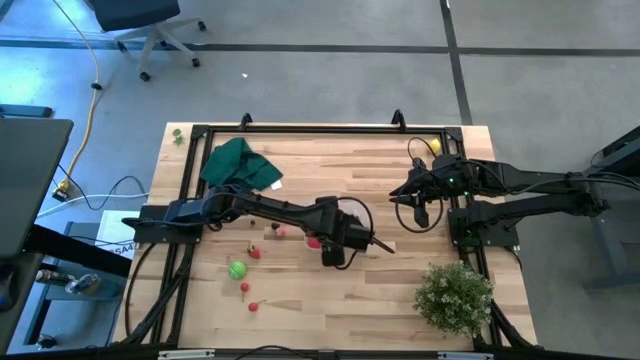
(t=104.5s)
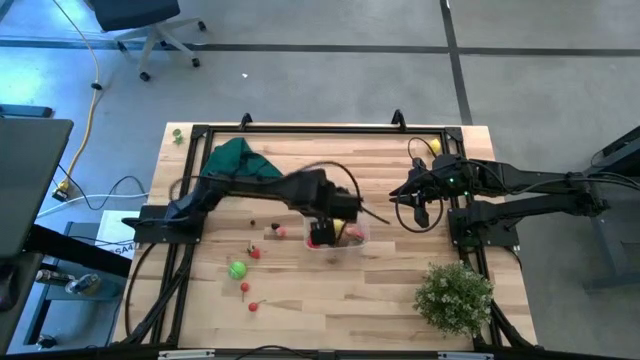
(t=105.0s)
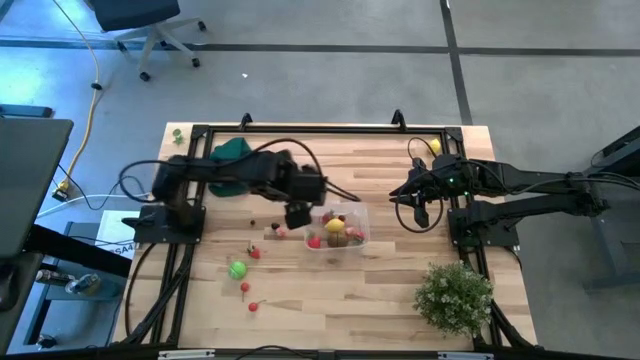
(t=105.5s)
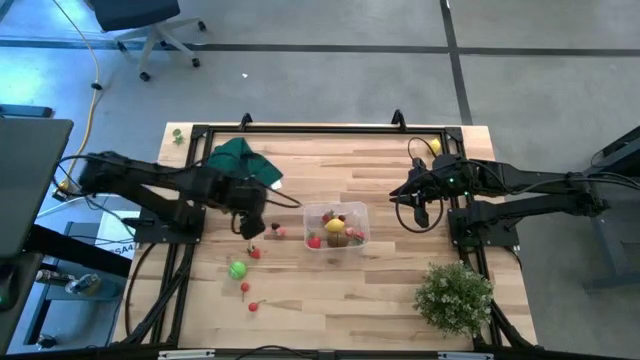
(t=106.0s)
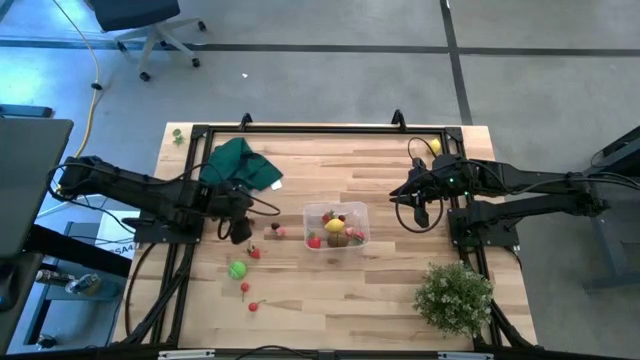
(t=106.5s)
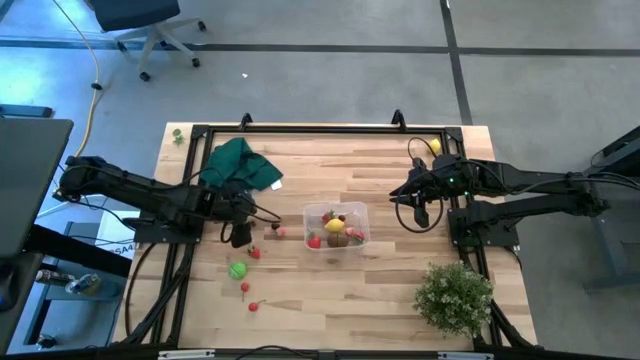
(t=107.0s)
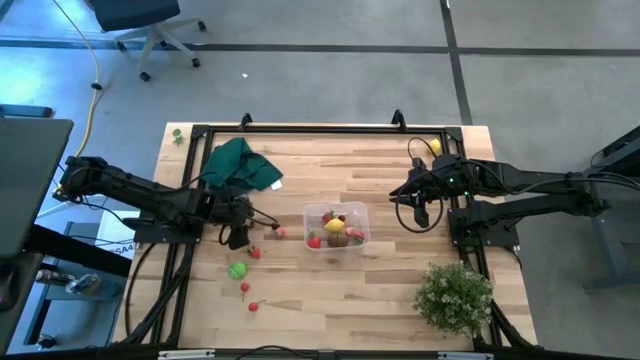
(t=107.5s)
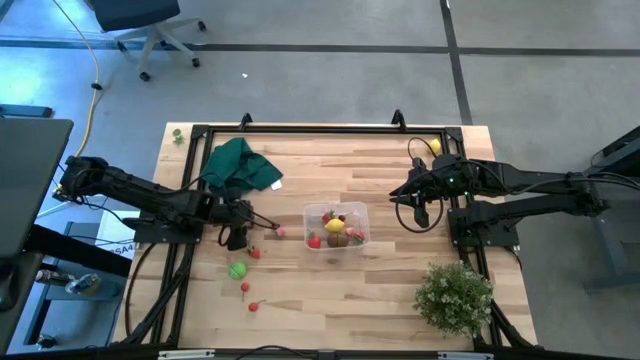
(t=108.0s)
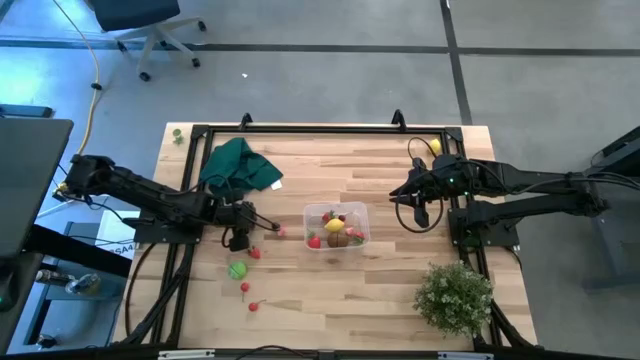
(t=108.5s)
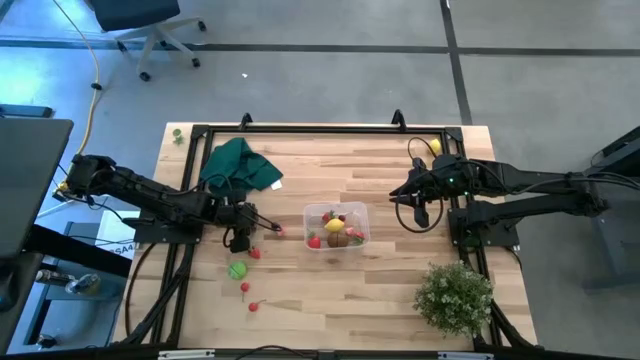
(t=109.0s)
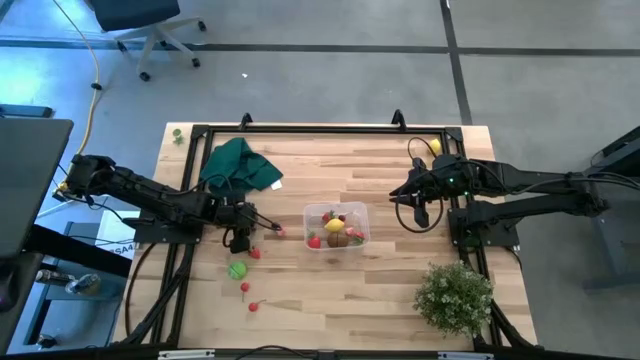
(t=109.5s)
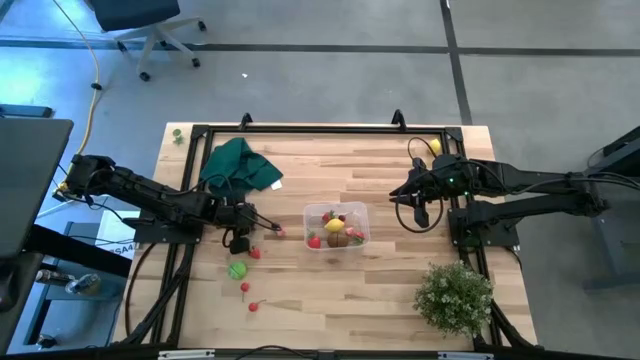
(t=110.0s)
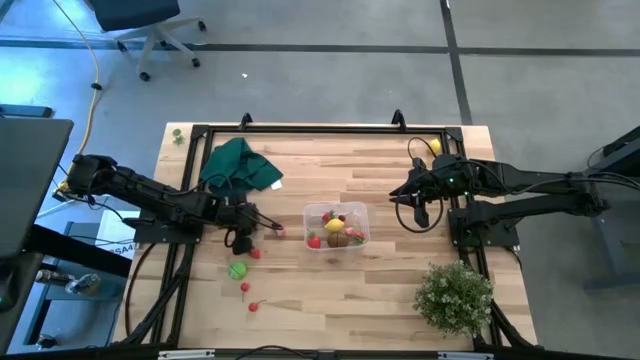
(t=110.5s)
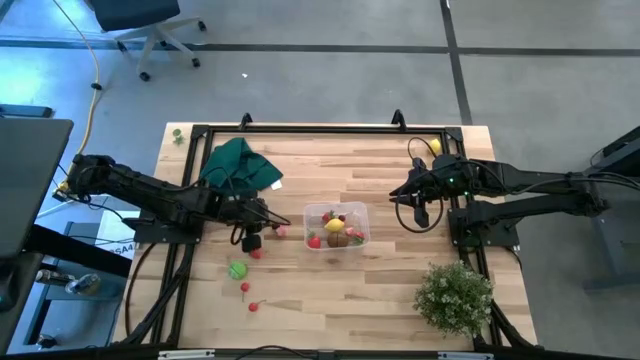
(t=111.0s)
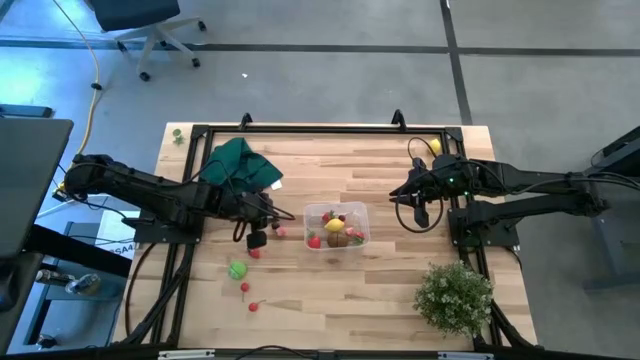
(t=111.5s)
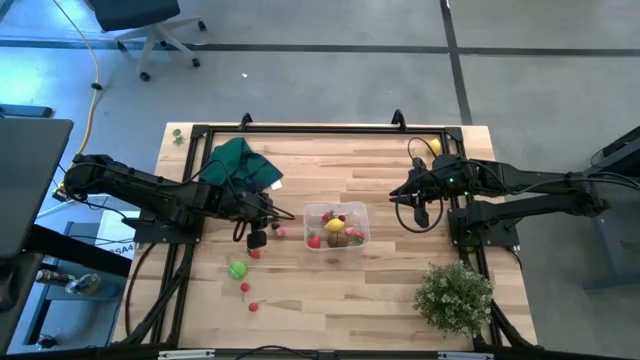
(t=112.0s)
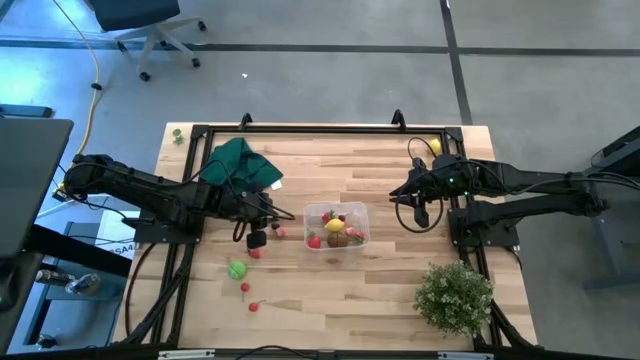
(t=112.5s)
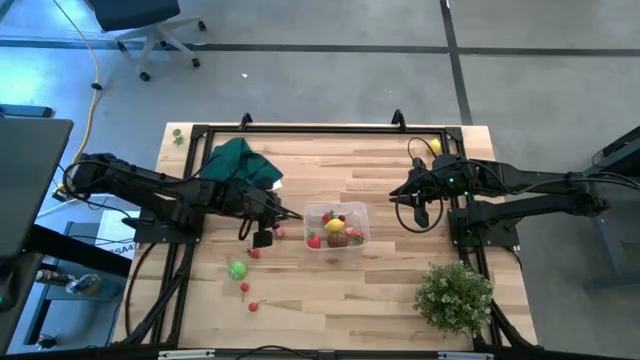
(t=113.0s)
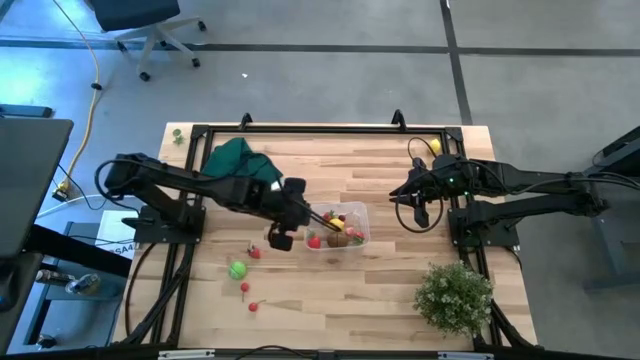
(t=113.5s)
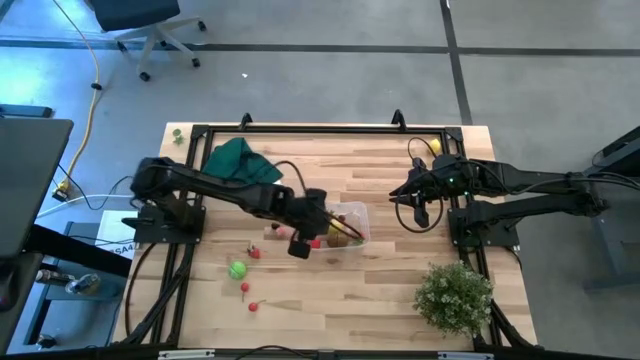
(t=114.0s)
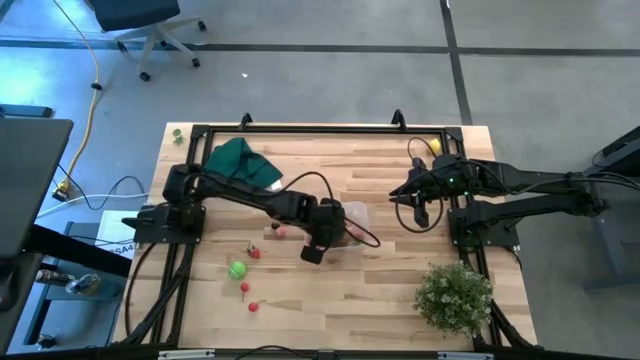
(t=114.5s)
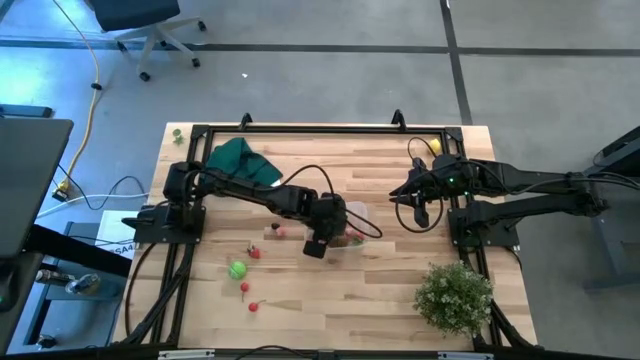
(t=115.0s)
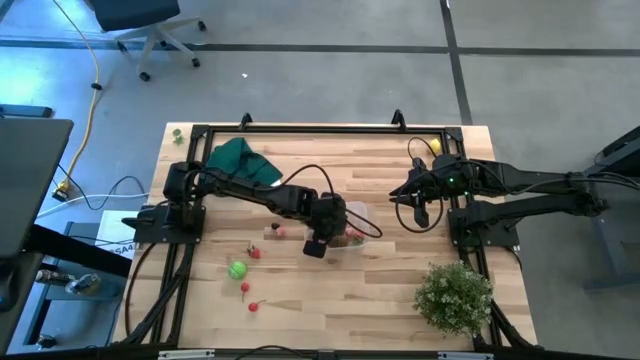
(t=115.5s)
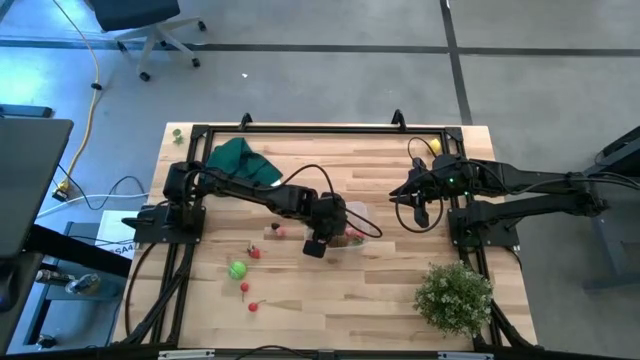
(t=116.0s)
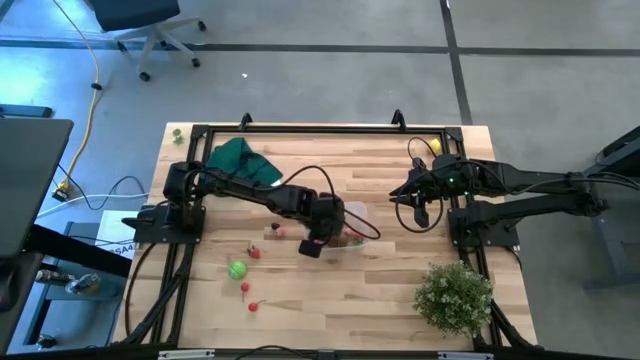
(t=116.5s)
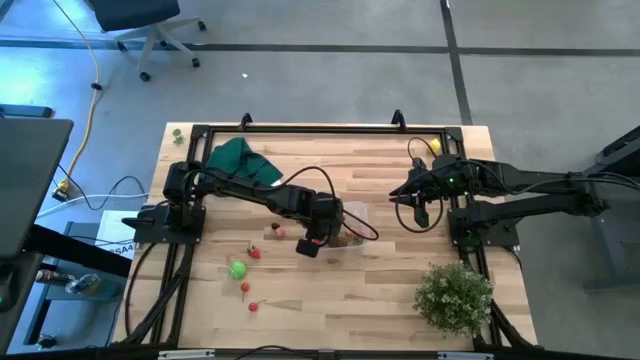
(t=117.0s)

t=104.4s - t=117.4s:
Task: Pick and placing Produce into tupperware
Put the blueberry into the transparent bin

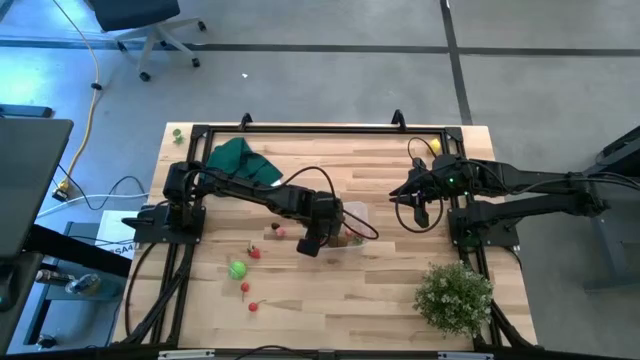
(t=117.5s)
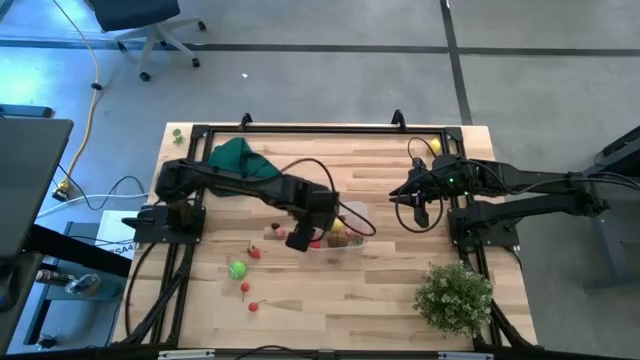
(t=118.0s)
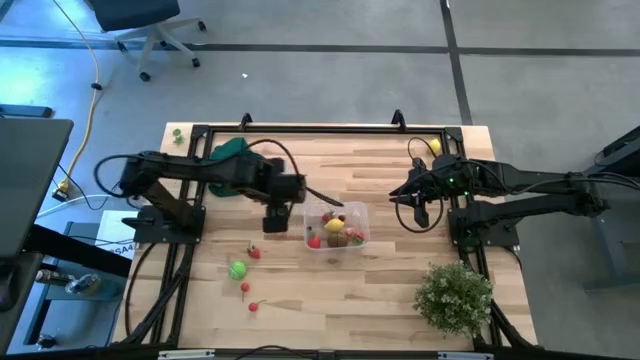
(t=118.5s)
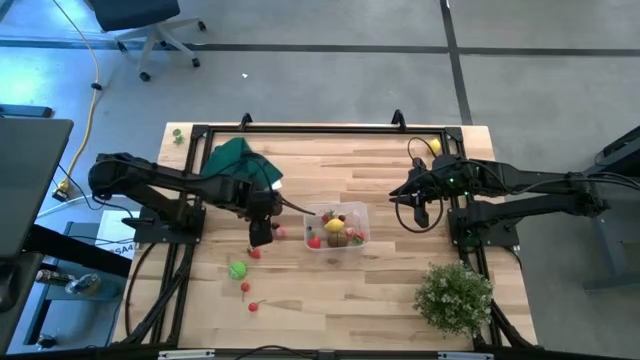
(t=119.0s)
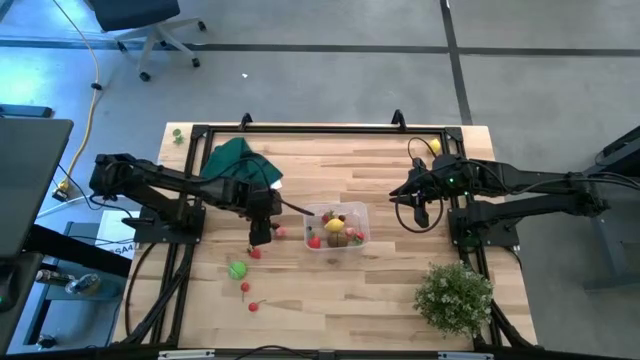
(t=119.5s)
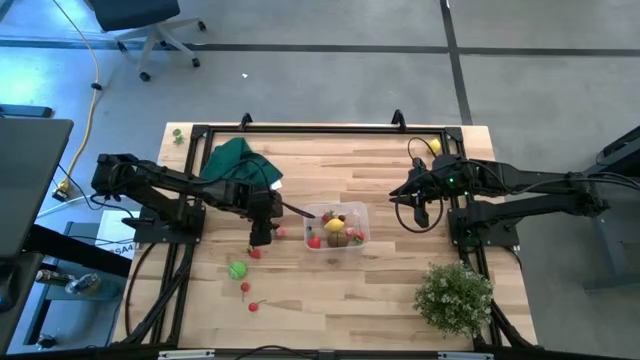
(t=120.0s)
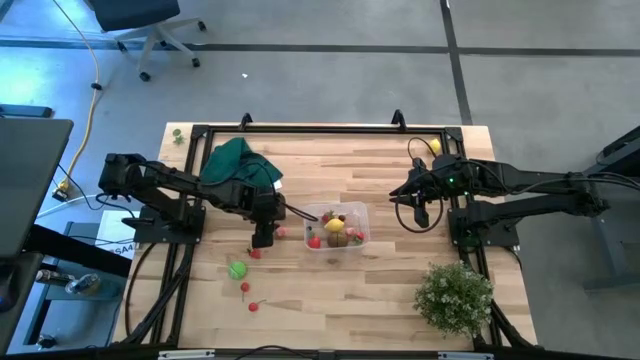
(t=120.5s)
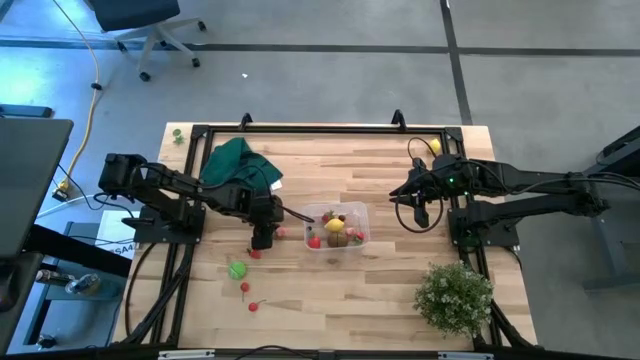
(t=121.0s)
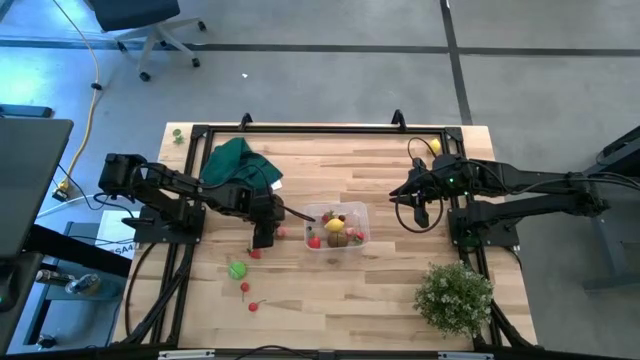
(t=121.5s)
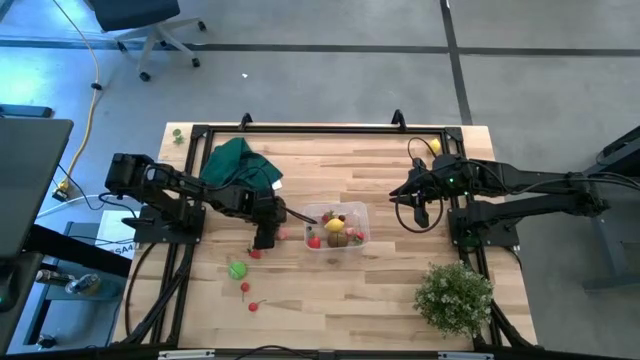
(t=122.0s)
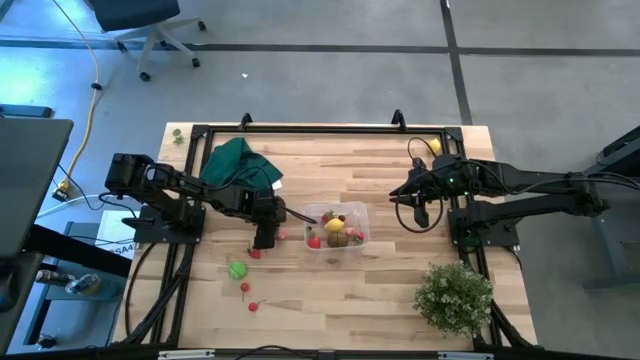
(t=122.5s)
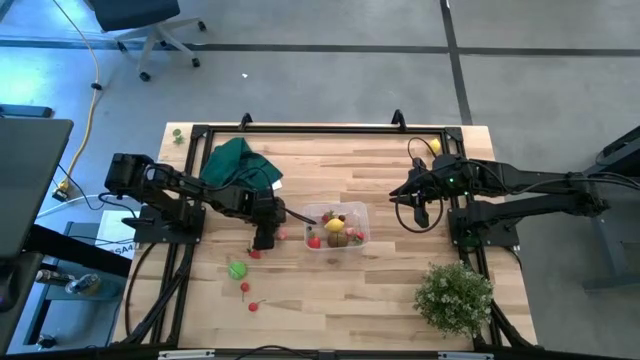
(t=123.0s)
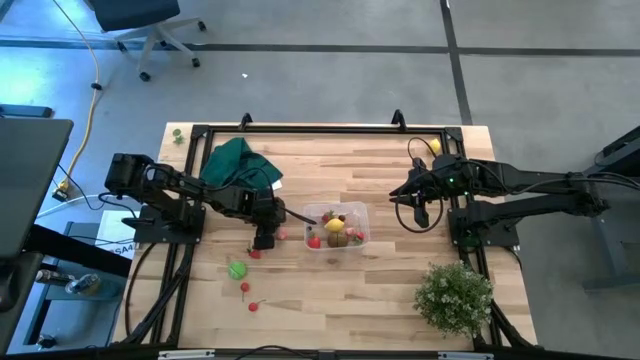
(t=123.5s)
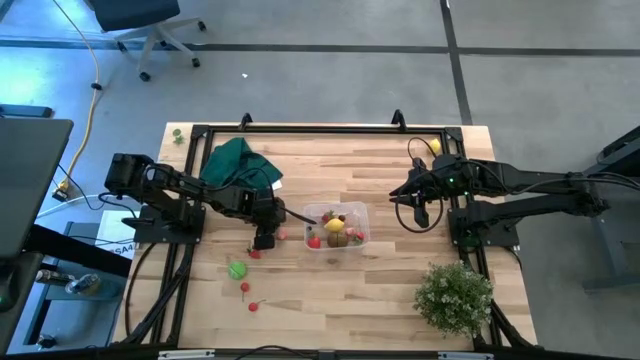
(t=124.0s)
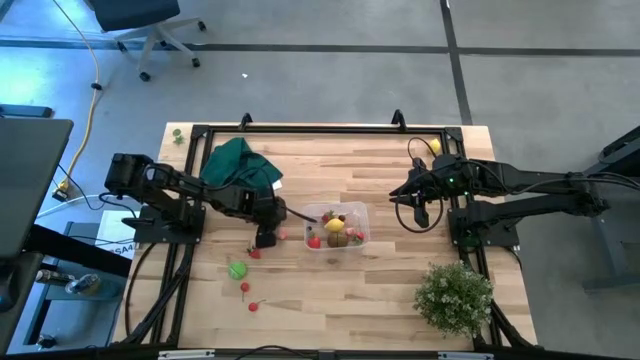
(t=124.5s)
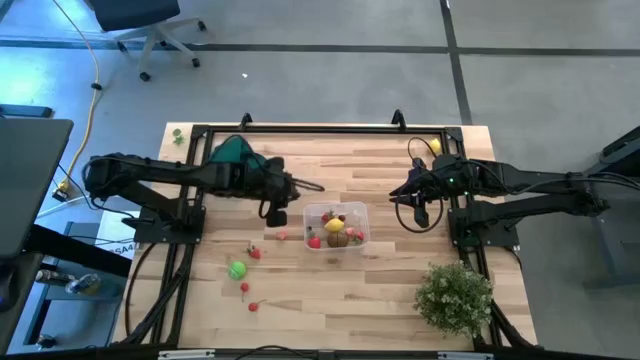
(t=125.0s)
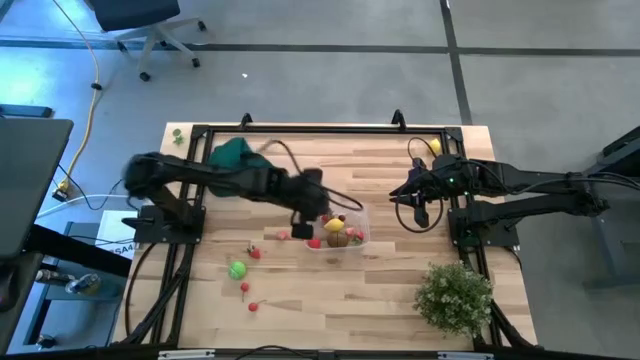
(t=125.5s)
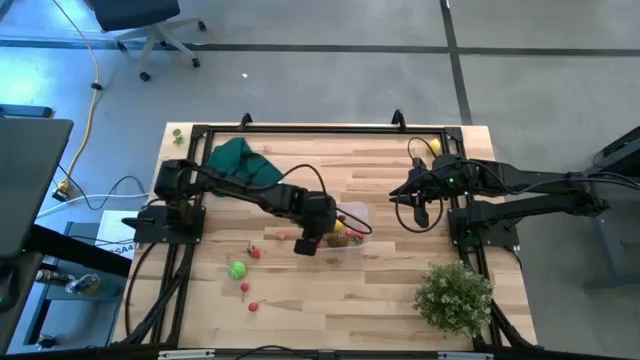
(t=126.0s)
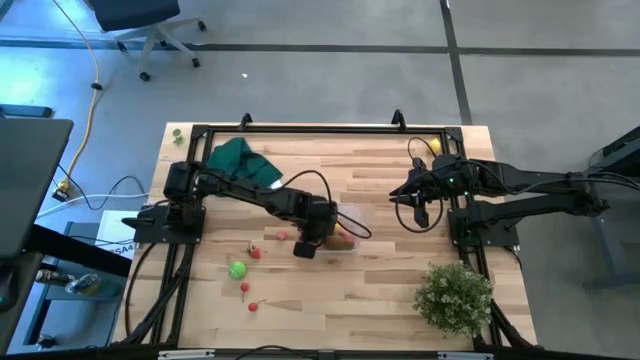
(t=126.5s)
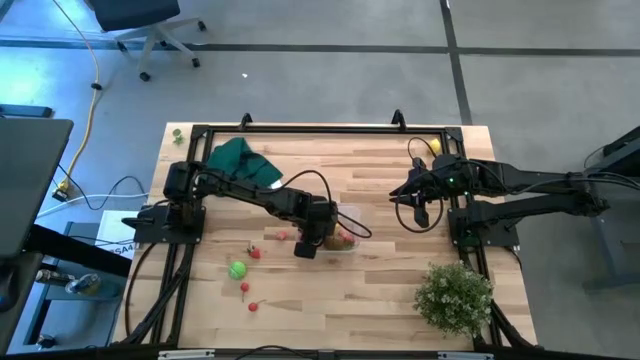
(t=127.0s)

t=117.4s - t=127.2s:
Put the blackberry into the transparent bin
